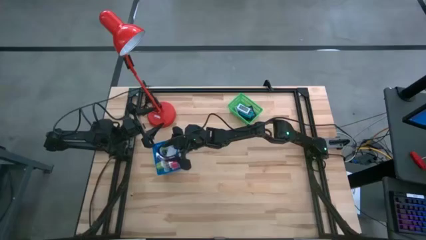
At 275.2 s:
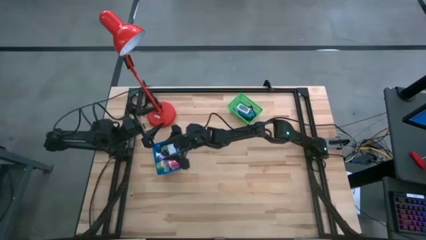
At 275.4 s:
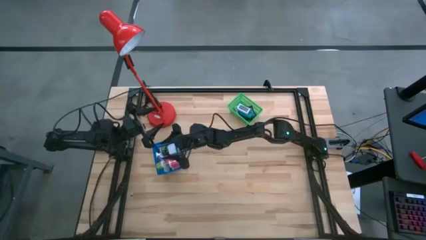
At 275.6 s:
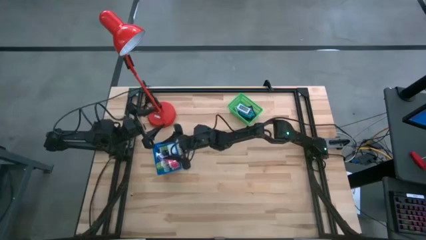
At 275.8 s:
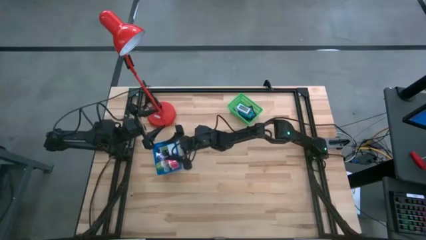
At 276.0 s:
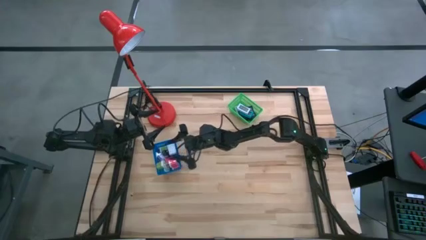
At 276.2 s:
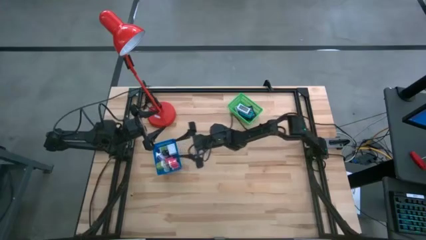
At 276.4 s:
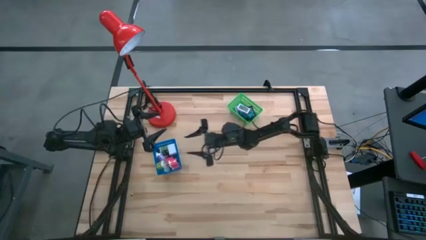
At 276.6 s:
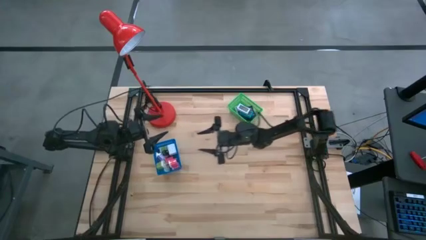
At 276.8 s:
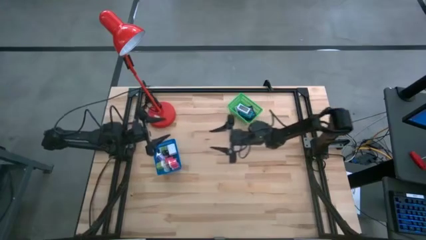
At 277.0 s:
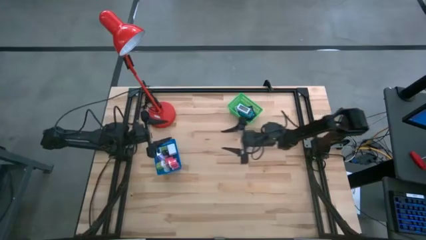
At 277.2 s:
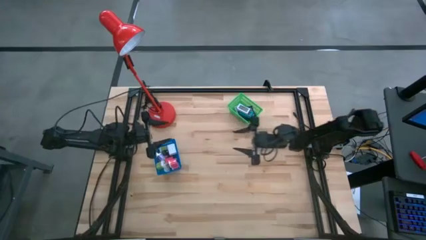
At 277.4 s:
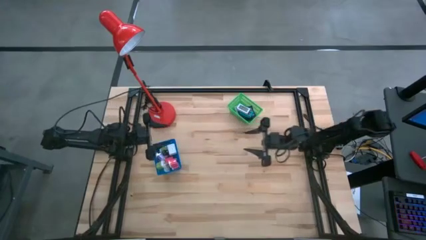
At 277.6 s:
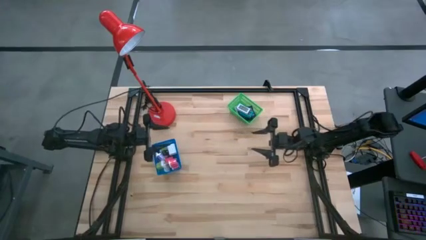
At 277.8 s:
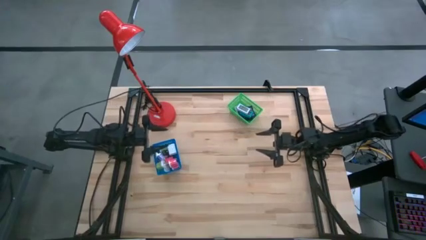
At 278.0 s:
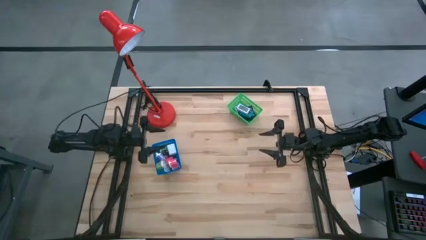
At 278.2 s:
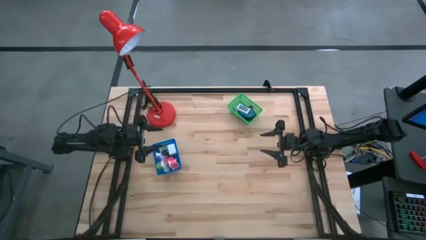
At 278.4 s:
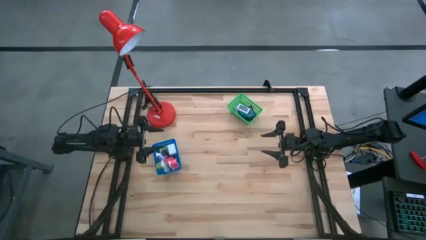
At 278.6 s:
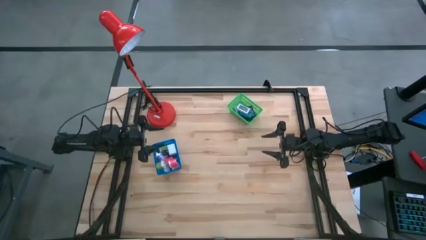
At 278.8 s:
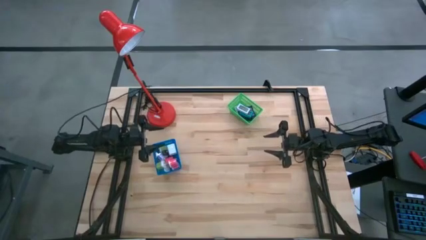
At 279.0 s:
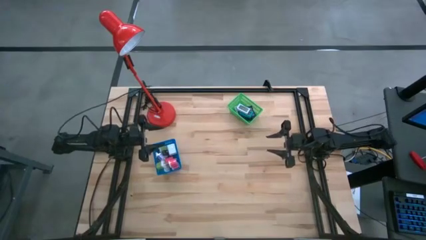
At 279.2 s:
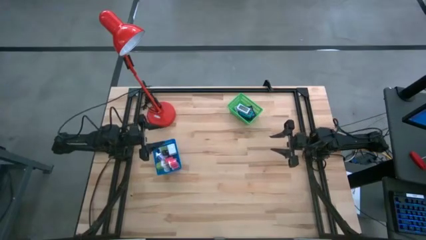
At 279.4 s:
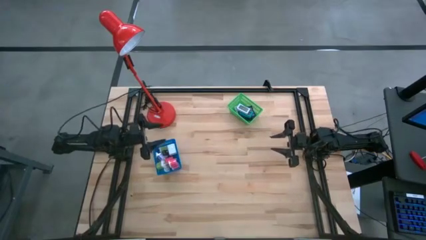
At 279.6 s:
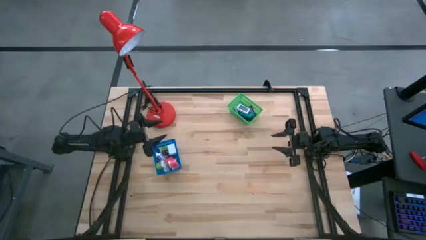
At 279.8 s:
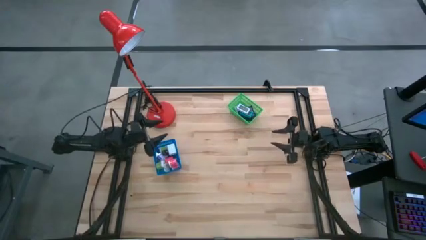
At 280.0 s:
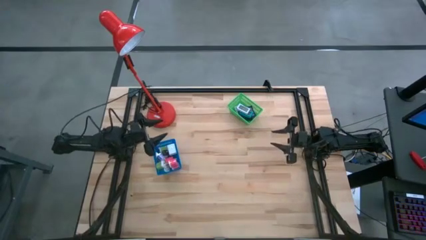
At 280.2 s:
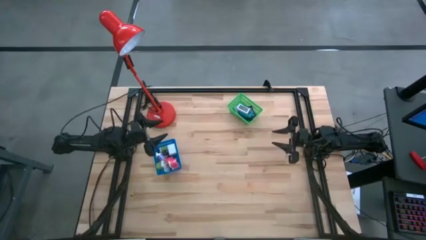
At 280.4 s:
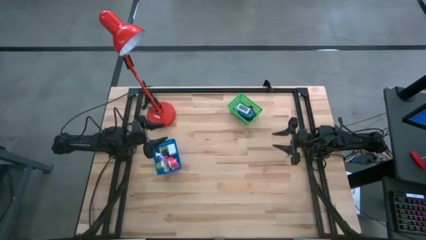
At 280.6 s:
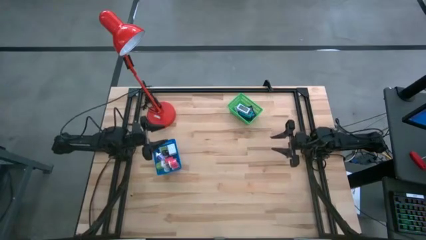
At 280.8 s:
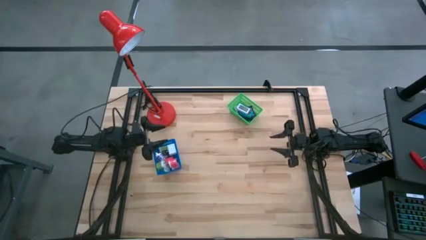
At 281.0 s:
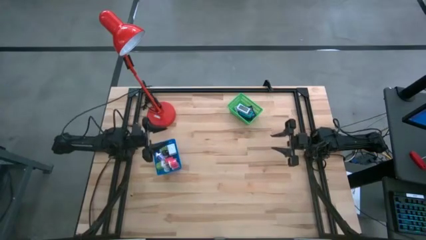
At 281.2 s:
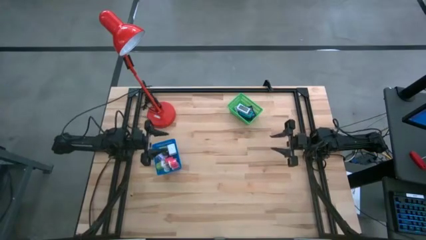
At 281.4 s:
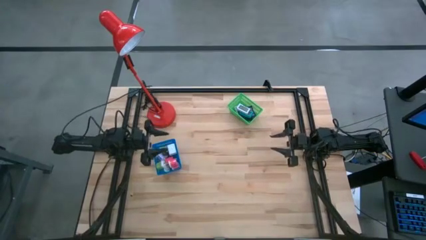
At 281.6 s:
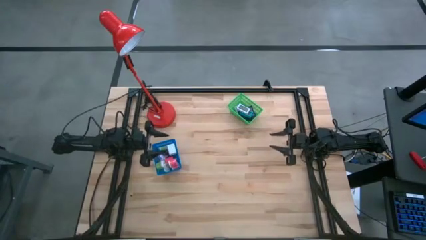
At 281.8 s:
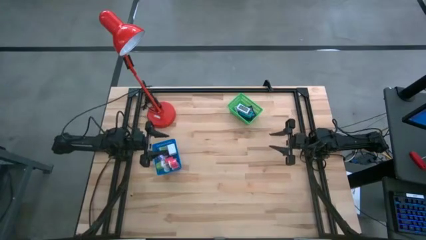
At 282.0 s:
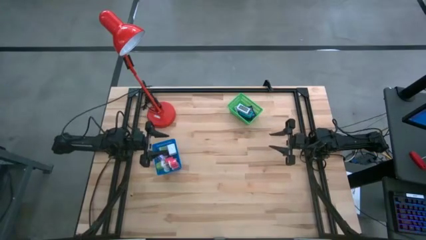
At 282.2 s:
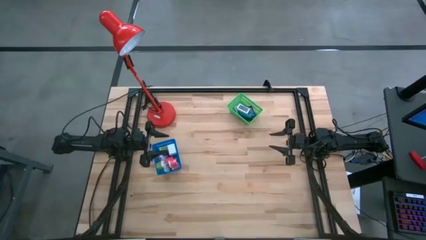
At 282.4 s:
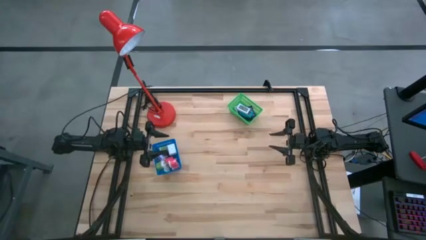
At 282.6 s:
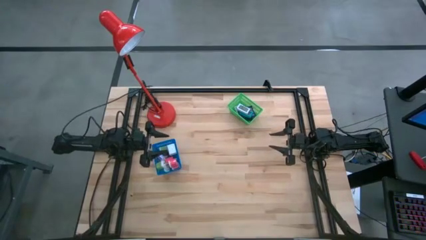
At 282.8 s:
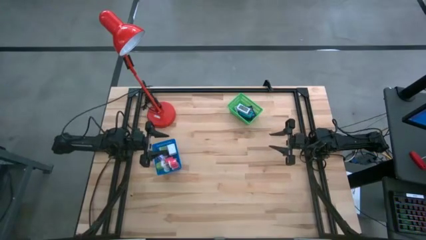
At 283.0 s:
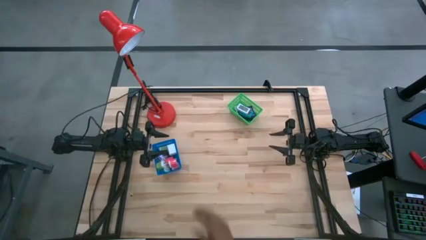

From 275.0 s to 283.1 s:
Task: Pick & Place Office items
Return to Home Position

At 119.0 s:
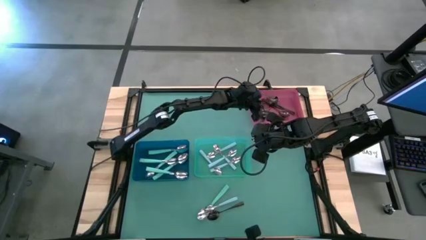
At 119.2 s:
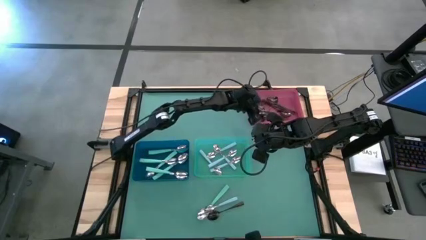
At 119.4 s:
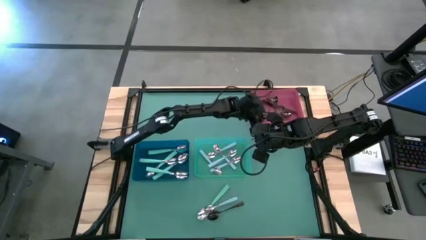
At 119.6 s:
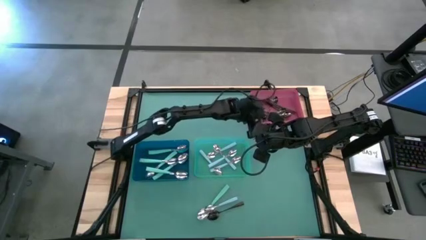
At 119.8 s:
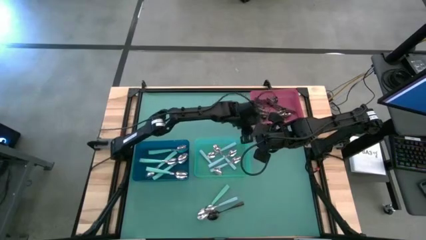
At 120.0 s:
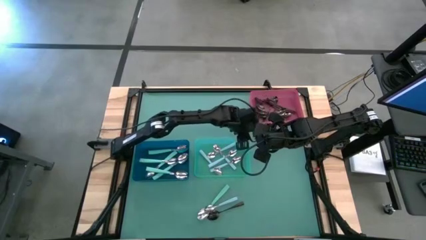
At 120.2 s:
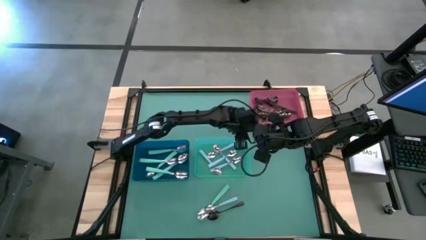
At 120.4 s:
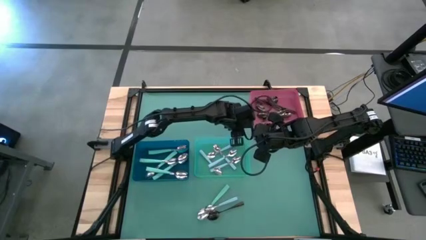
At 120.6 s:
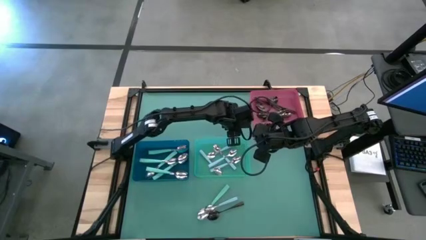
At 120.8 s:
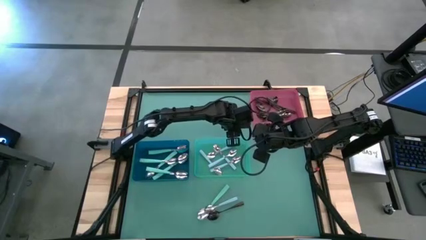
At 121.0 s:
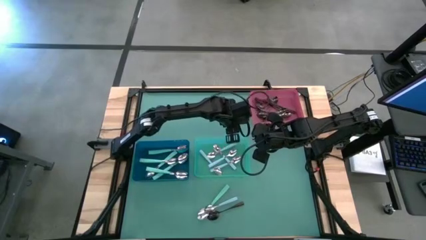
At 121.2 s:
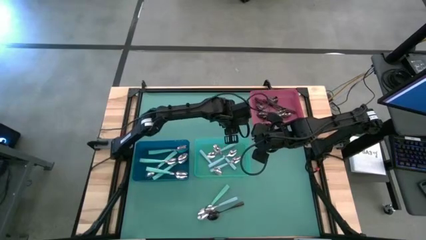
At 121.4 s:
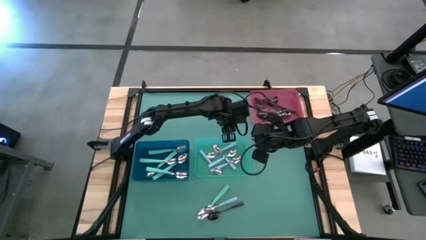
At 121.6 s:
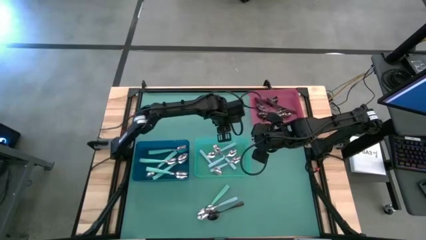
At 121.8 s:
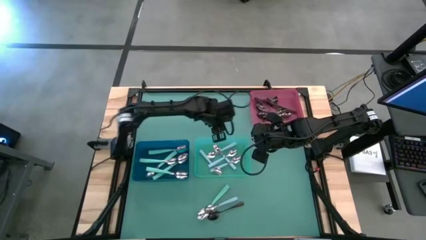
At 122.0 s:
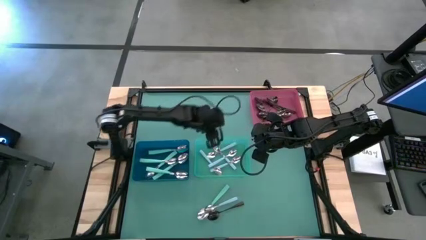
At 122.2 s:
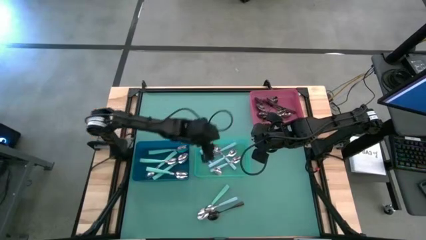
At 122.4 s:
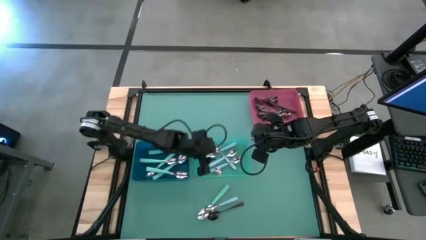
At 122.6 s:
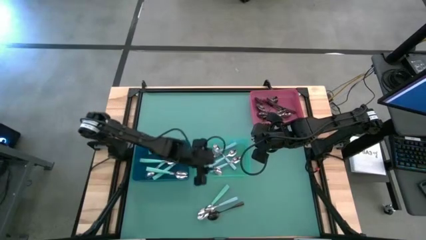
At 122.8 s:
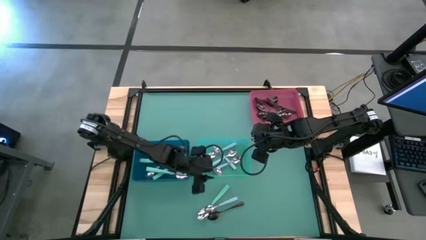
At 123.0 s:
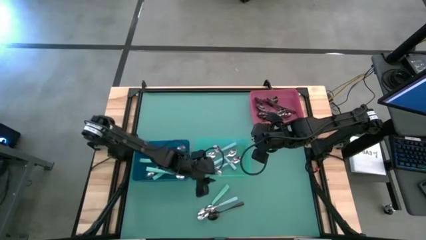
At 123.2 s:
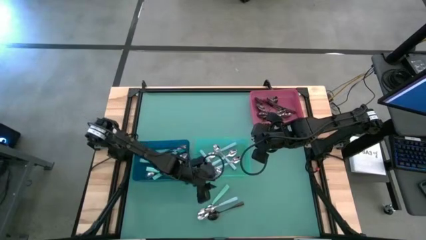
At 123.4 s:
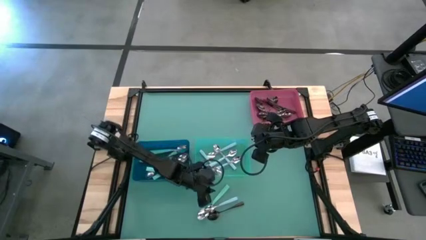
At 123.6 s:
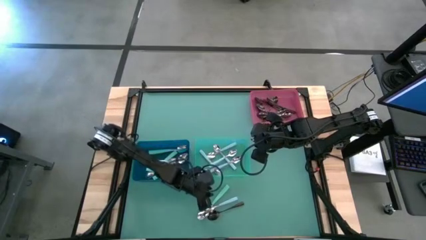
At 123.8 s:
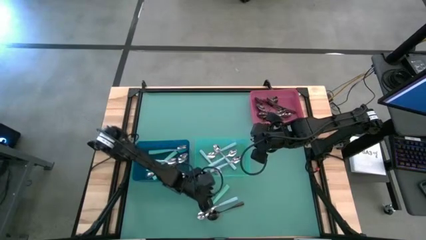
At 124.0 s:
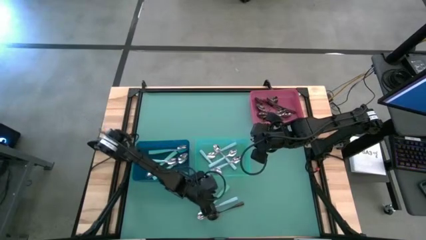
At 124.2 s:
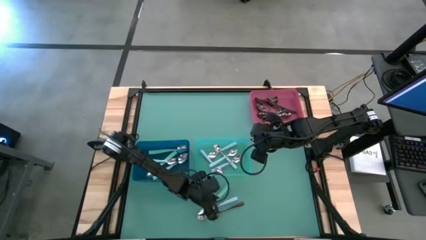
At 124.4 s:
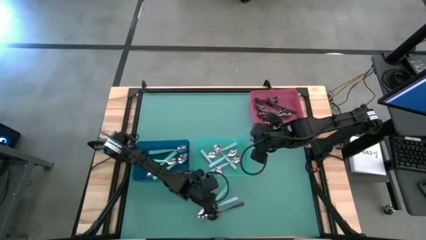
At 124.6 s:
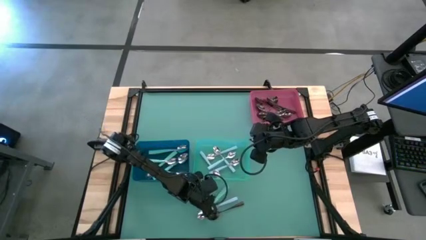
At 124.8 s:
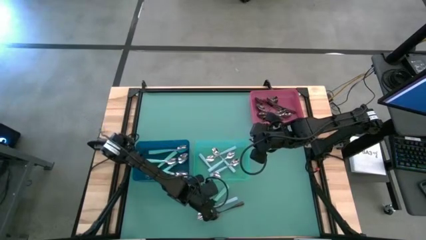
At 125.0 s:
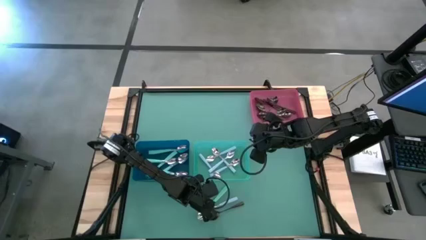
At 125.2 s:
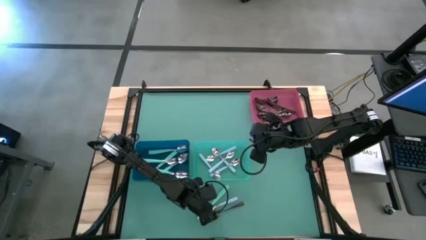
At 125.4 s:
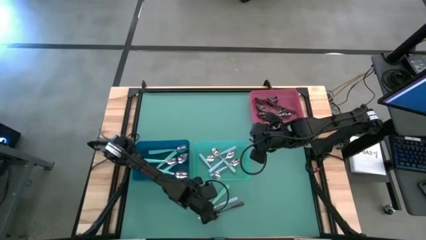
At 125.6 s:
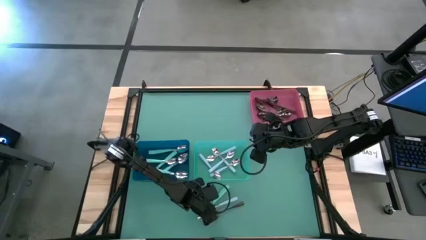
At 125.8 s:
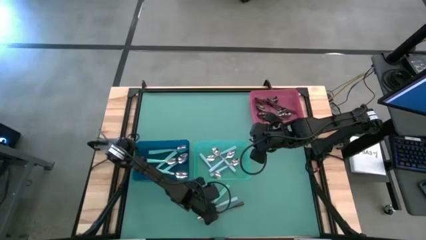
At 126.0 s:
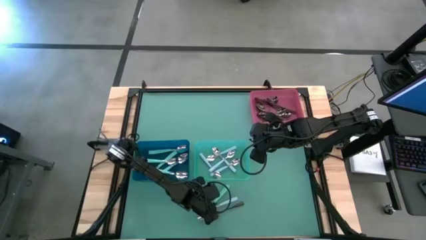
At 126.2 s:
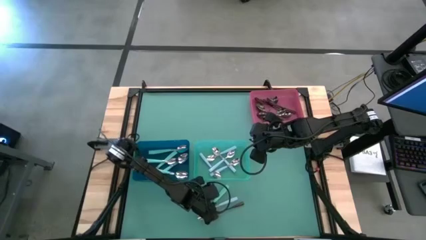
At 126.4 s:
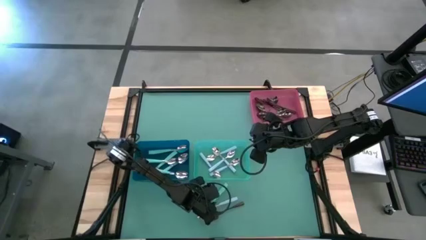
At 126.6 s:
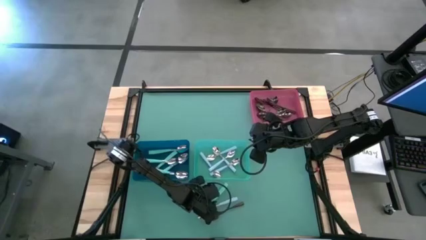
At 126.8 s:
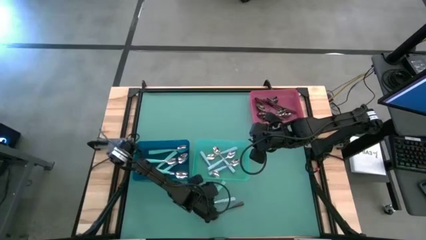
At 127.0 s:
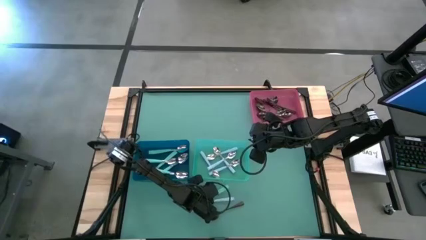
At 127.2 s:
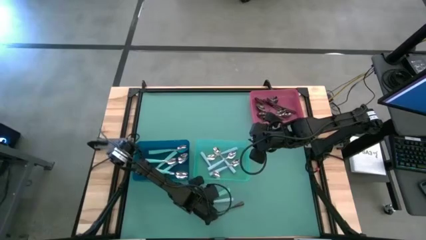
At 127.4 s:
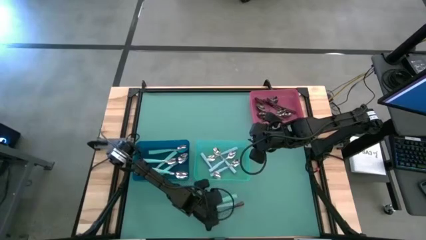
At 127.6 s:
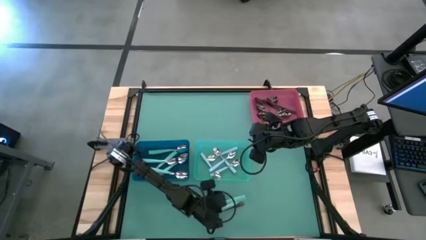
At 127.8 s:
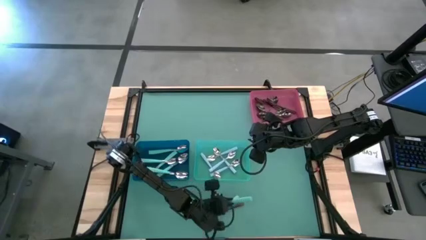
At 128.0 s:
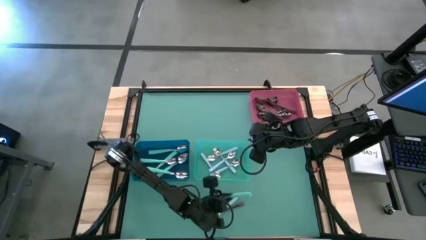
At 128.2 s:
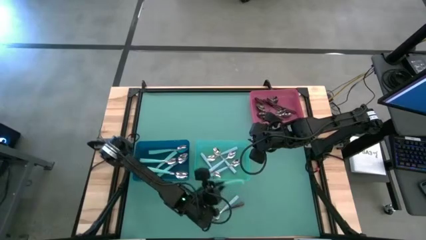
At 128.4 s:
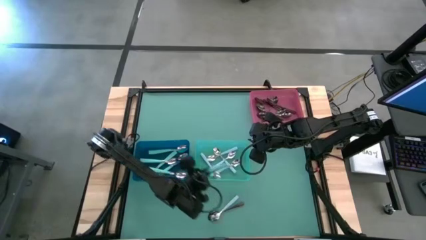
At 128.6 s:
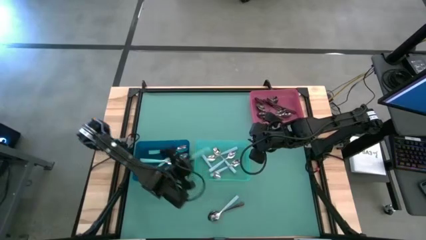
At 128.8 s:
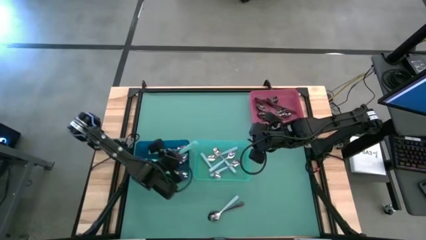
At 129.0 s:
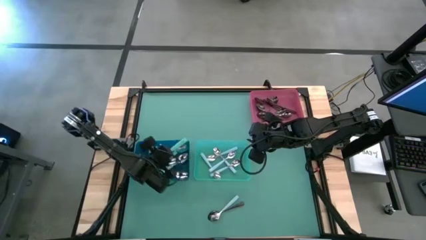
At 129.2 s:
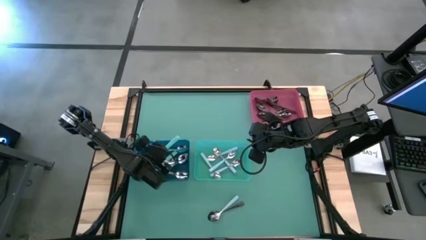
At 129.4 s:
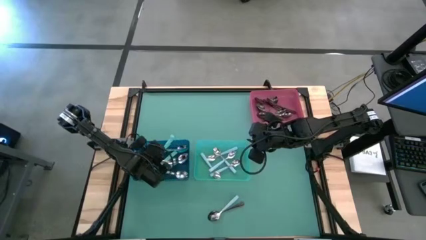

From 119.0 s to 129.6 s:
Task: Sort silverware by color (type)
Put the green spoon into the blue bin
